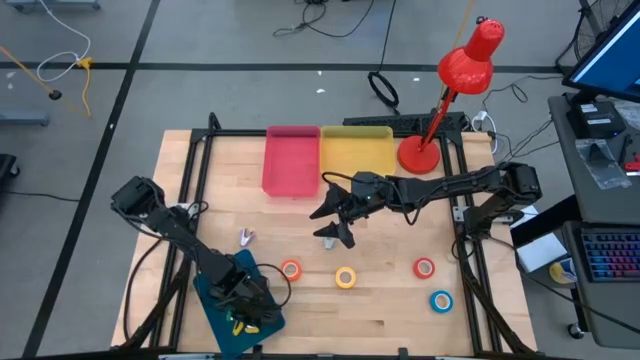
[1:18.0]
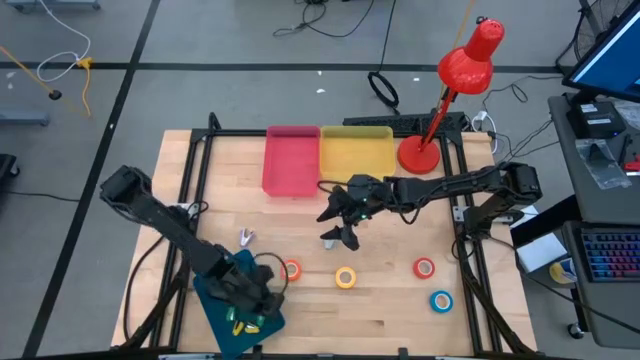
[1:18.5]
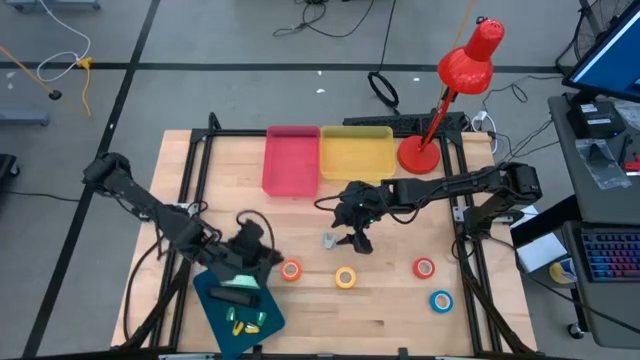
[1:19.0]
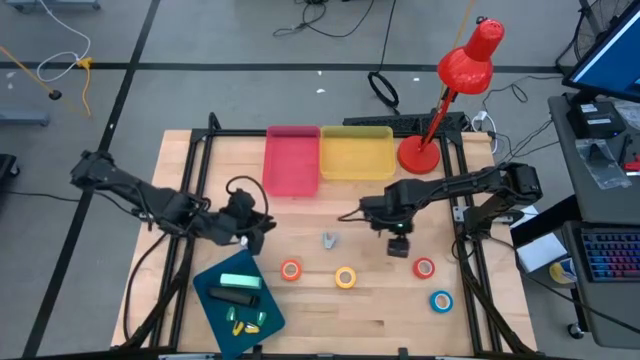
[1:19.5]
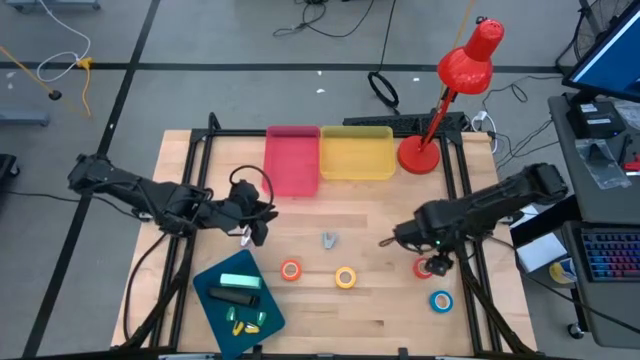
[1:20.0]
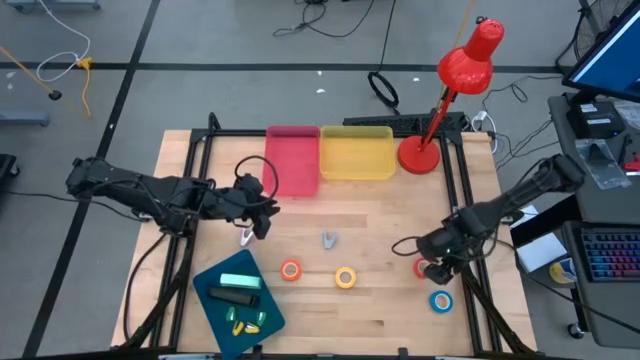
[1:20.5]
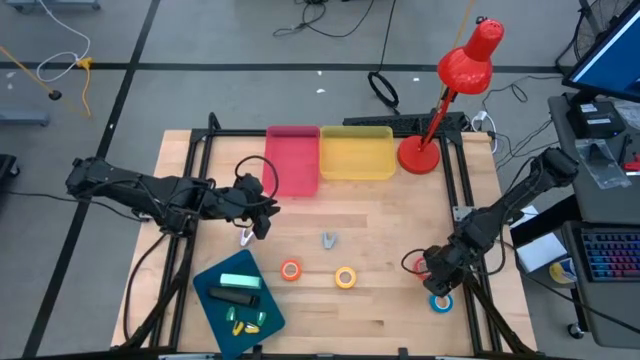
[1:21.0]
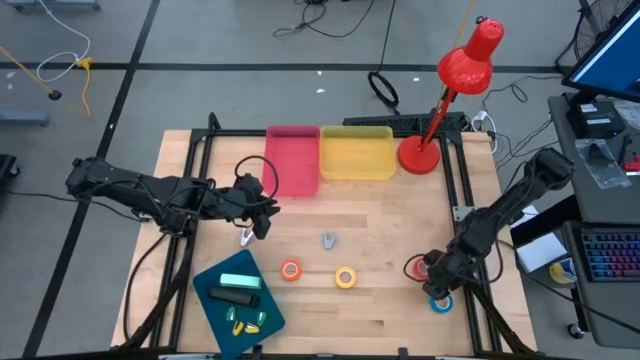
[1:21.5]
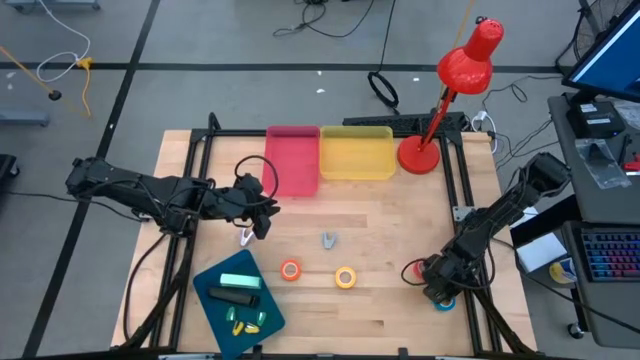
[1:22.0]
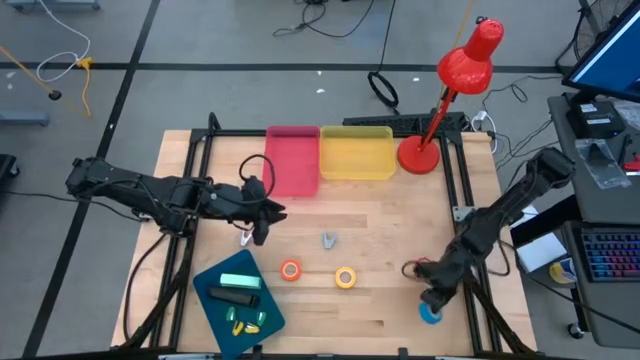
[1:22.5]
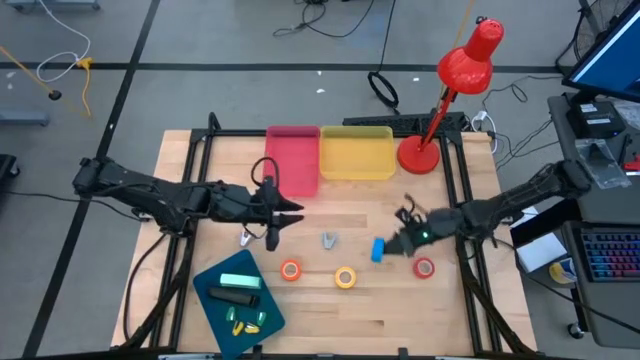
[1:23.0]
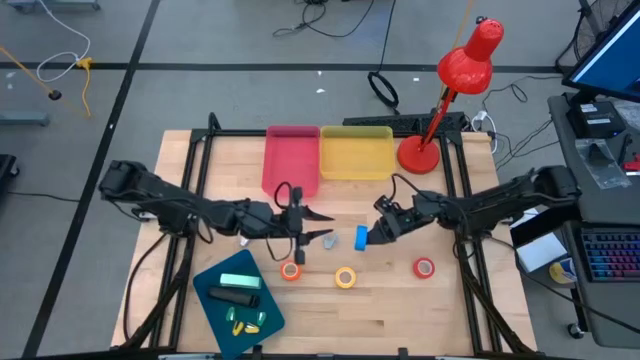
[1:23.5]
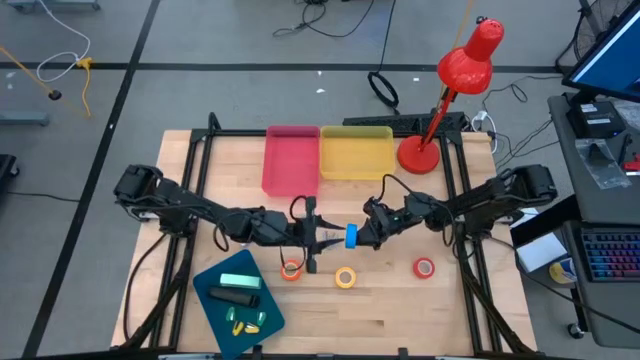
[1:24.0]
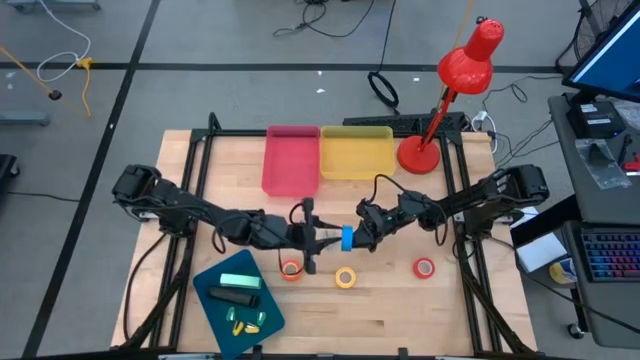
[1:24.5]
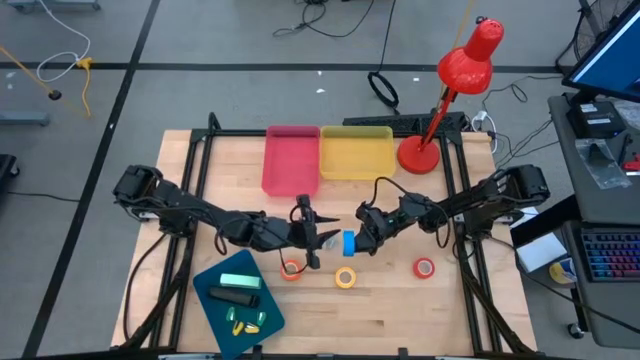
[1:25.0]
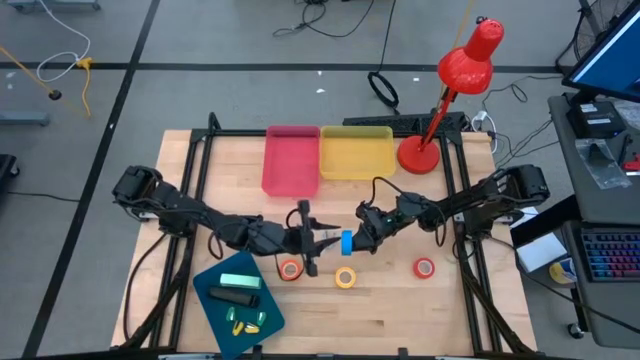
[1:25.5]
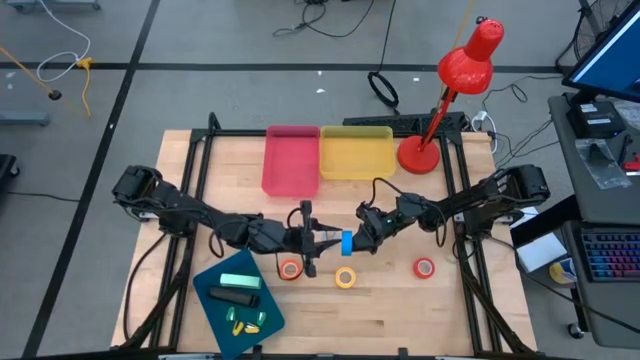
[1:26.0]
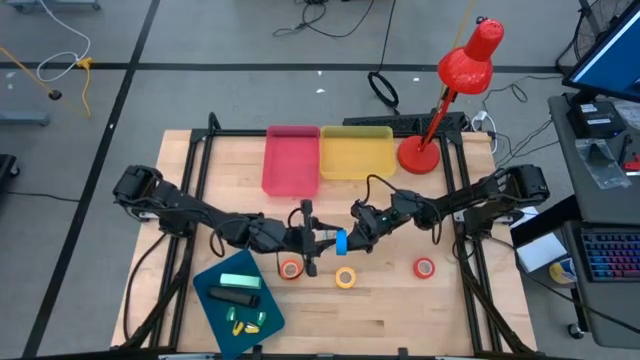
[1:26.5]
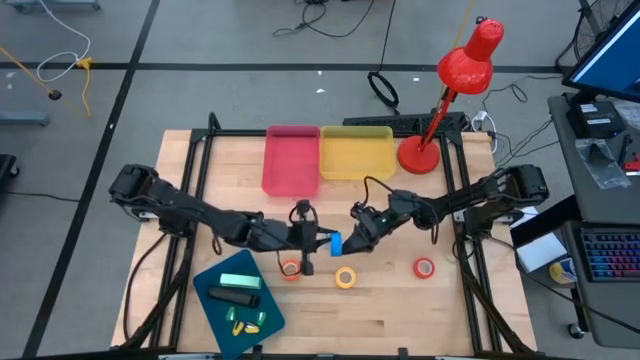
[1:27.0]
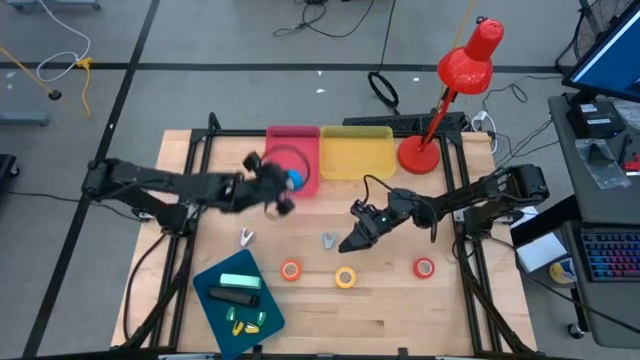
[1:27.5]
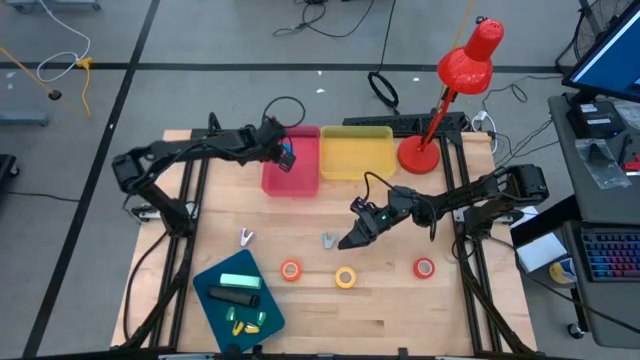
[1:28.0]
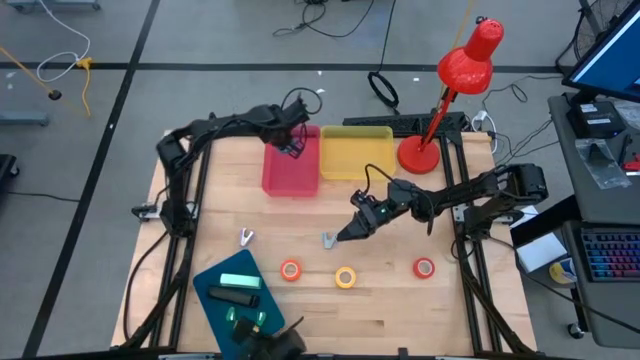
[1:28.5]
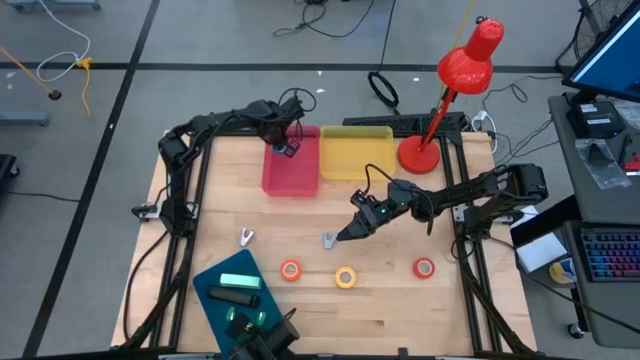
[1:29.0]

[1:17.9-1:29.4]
Task: Pick and place Stapler, Stapler remover, tape
Put the blue tape into the red bin

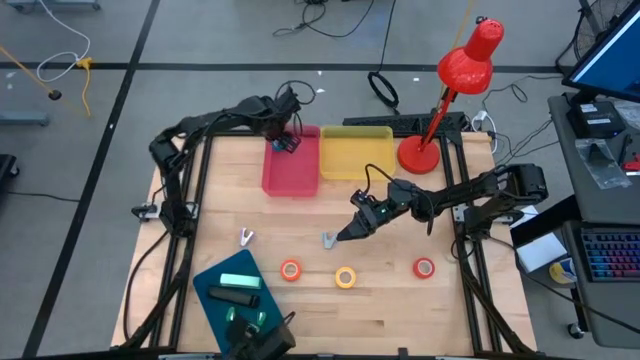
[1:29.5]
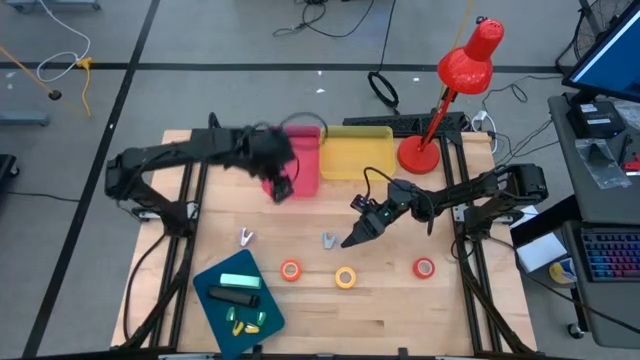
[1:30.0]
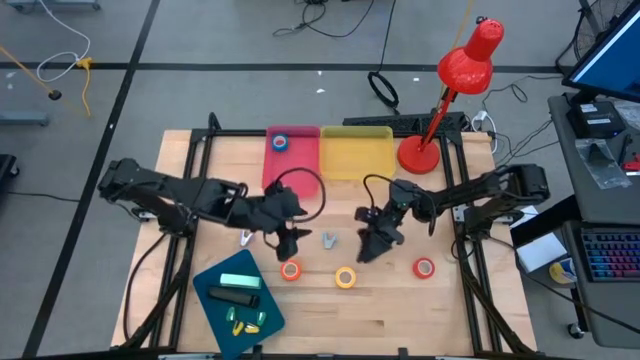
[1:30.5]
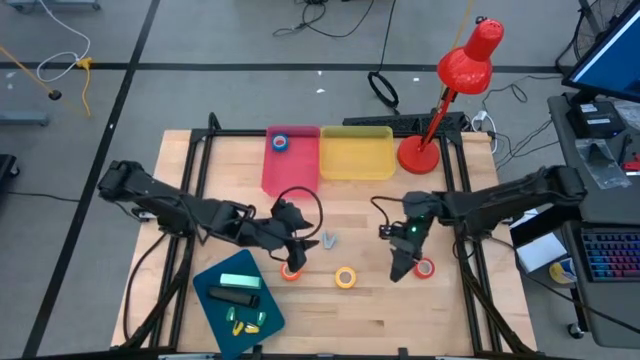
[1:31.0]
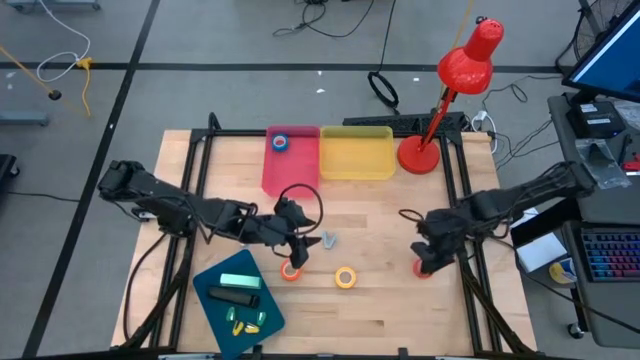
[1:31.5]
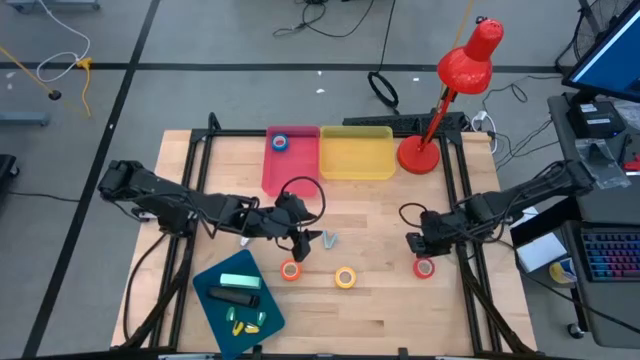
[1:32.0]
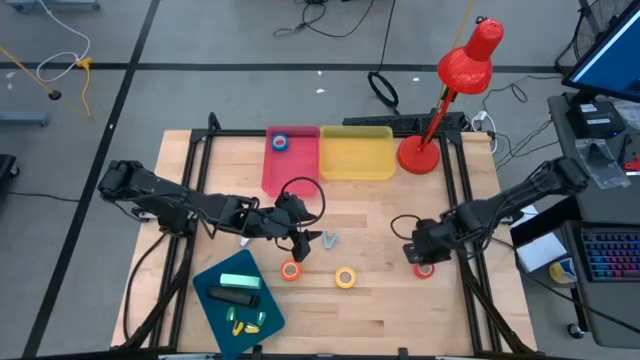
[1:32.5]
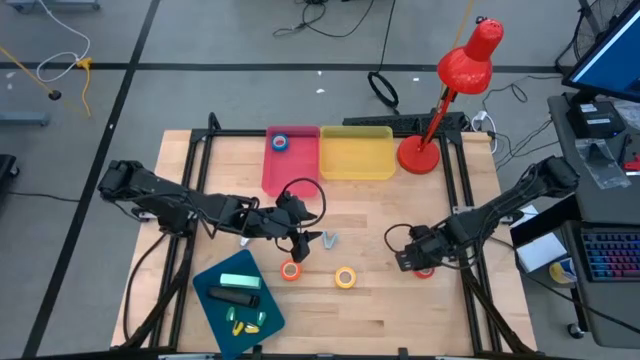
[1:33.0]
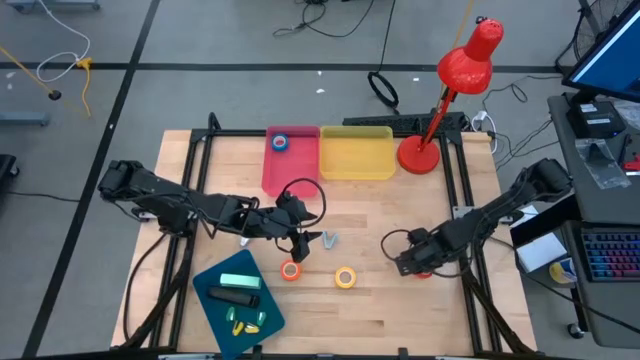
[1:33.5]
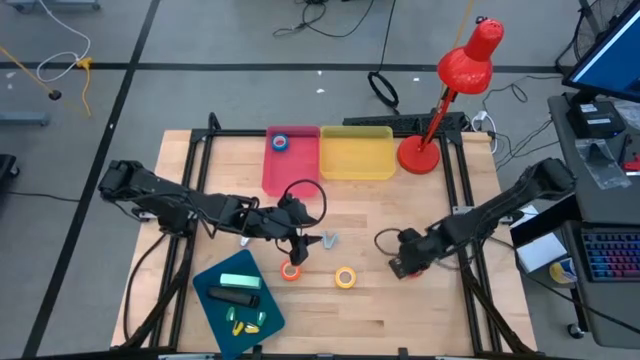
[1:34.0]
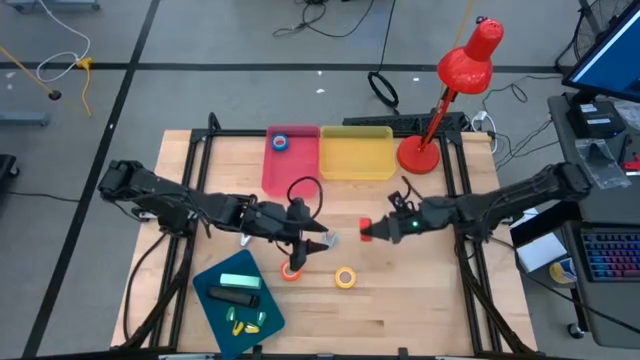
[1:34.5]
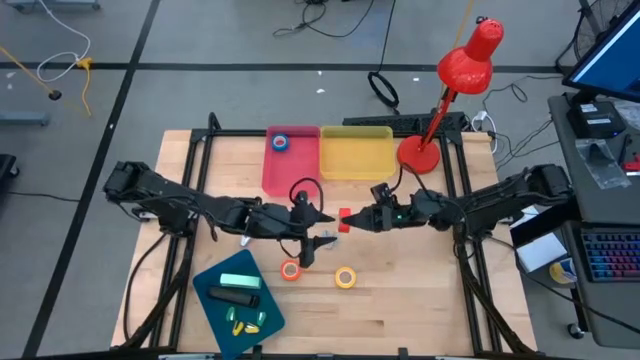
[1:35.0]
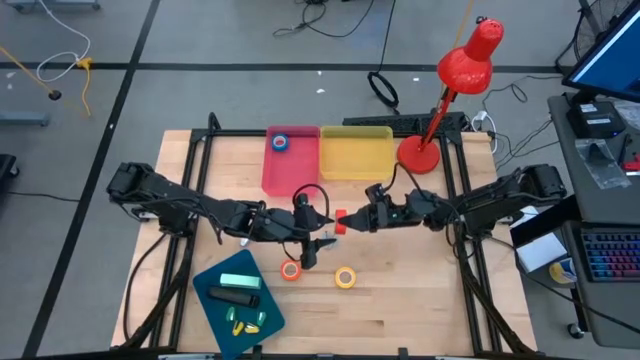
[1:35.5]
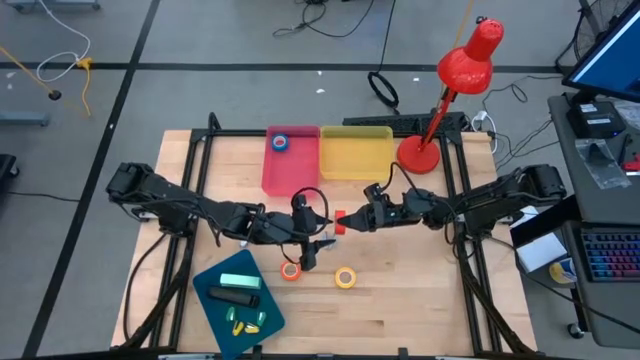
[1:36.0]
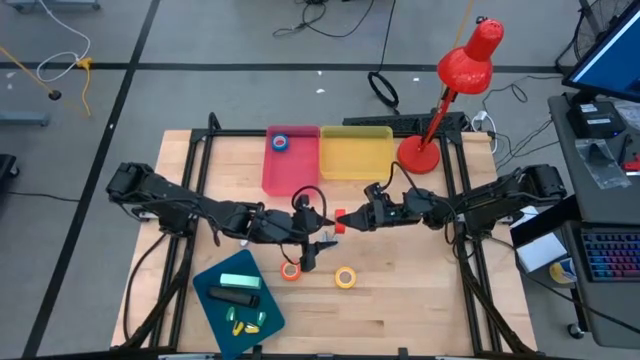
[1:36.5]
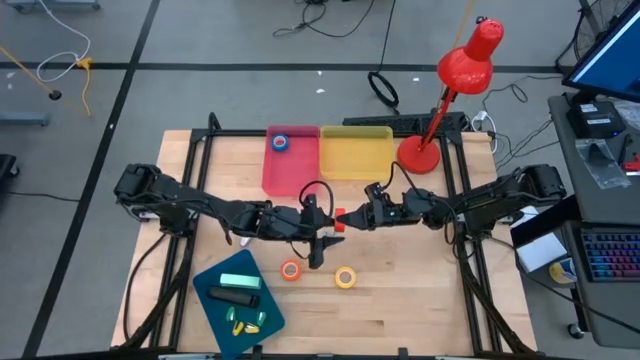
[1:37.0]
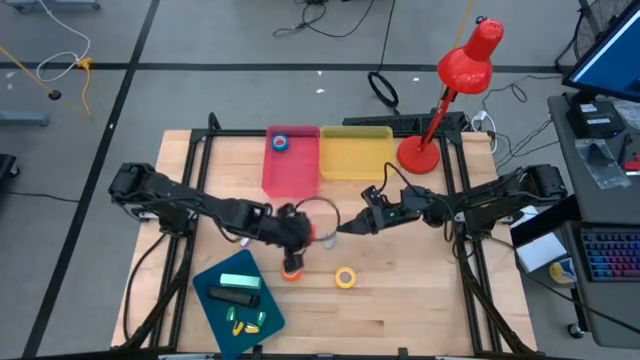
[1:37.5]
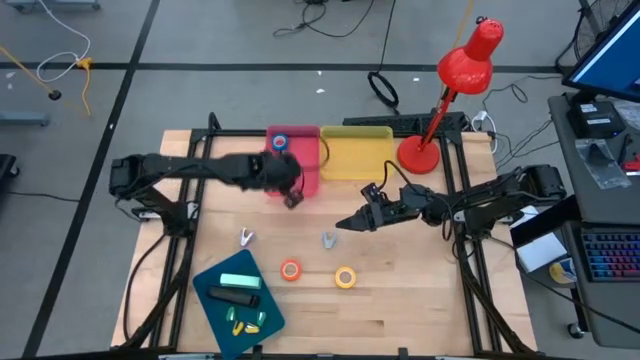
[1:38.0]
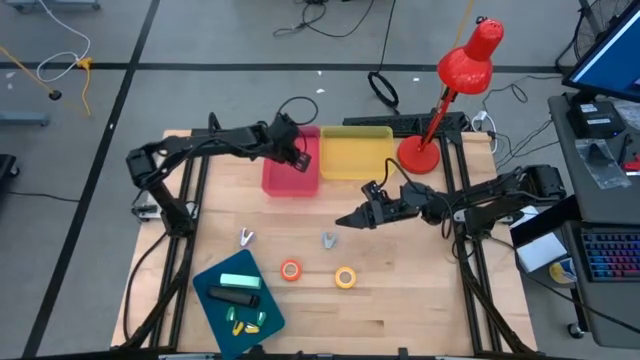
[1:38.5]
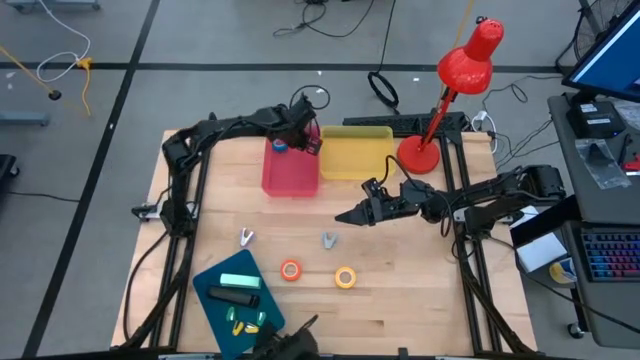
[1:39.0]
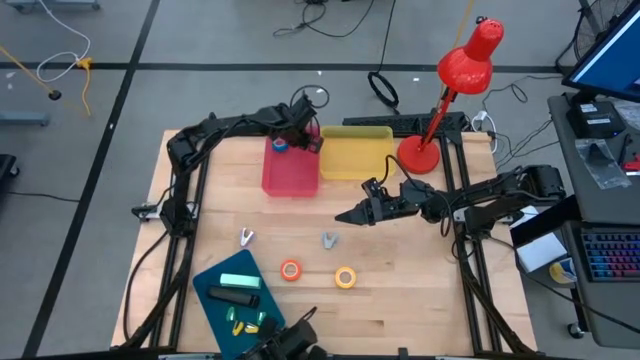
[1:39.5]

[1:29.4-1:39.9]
Put the right orange tape into the red bin
